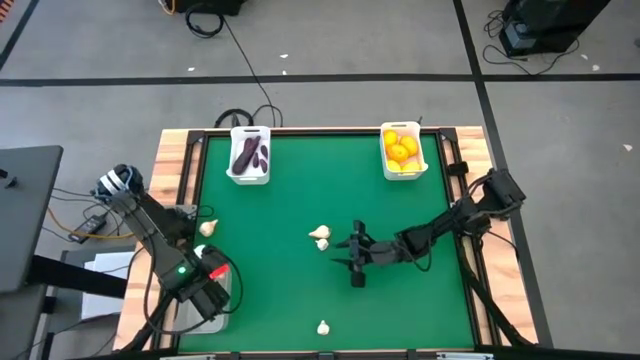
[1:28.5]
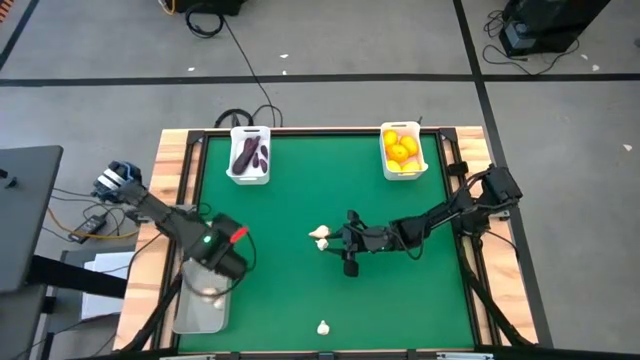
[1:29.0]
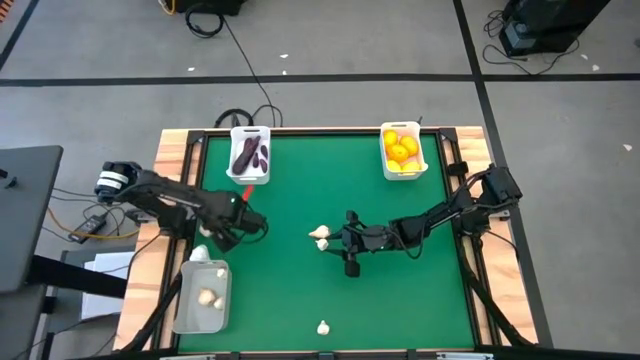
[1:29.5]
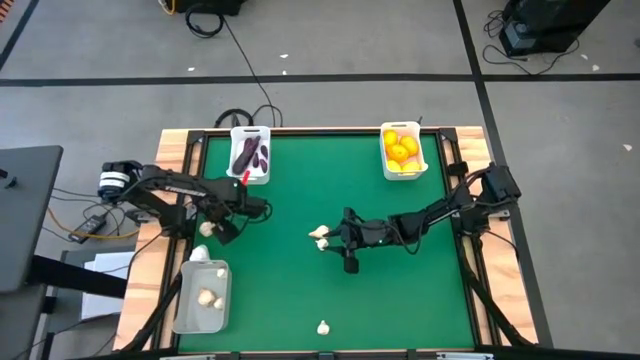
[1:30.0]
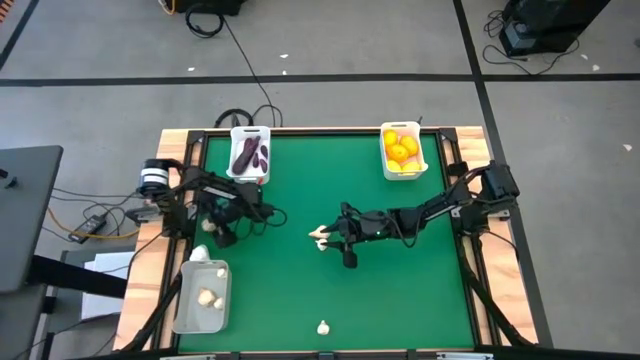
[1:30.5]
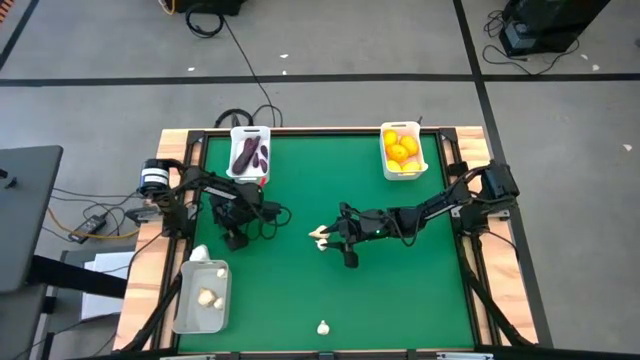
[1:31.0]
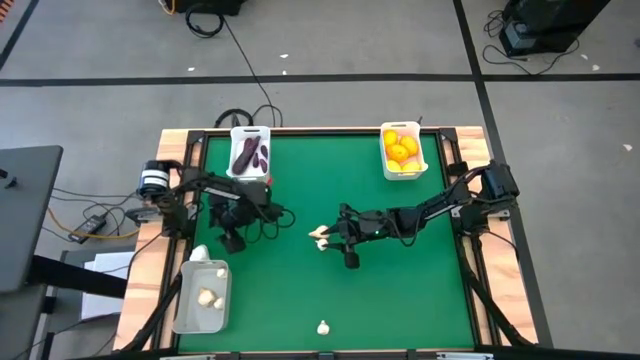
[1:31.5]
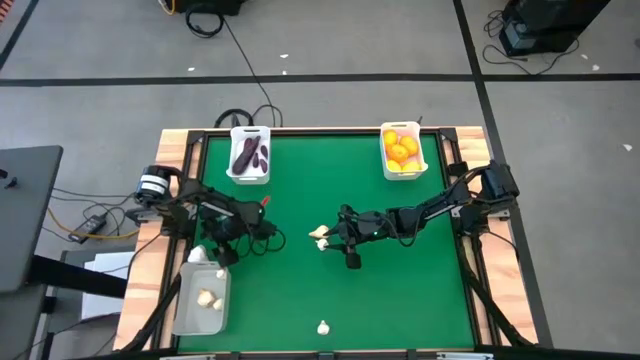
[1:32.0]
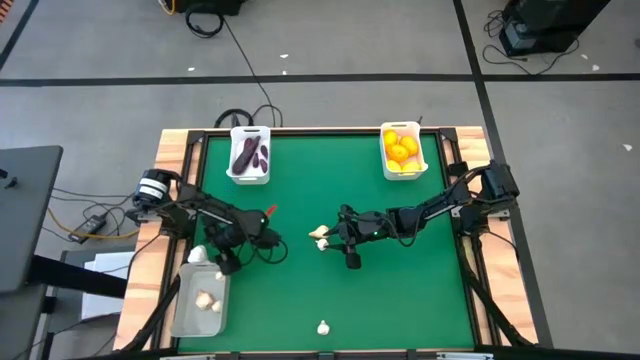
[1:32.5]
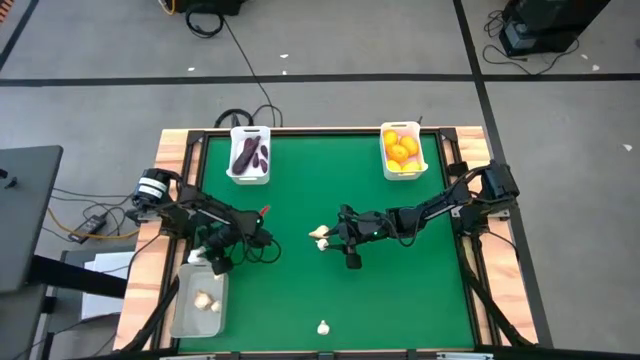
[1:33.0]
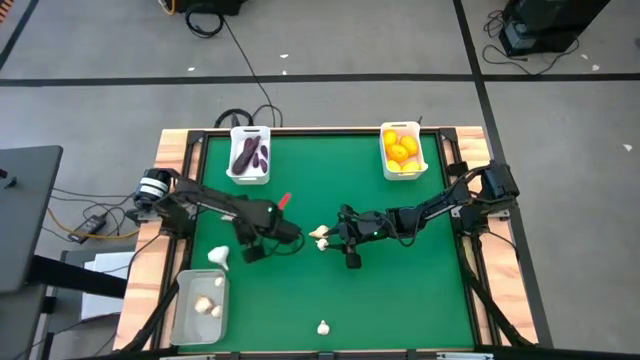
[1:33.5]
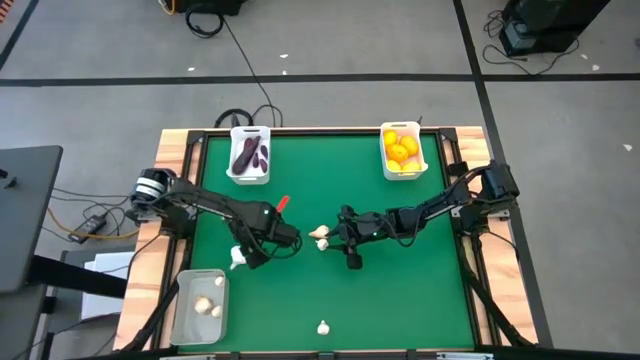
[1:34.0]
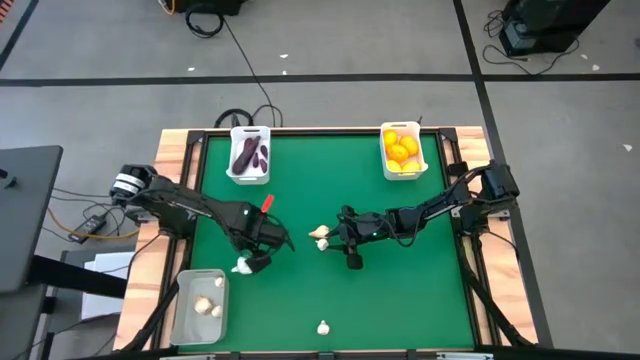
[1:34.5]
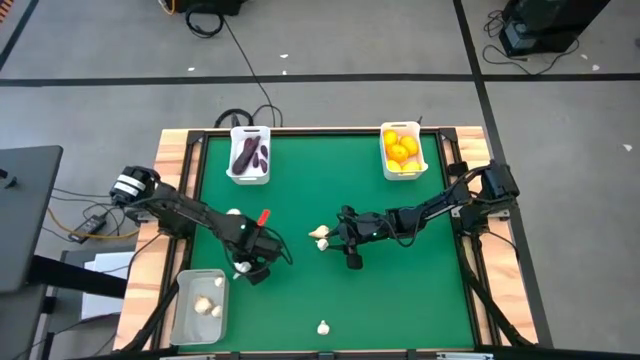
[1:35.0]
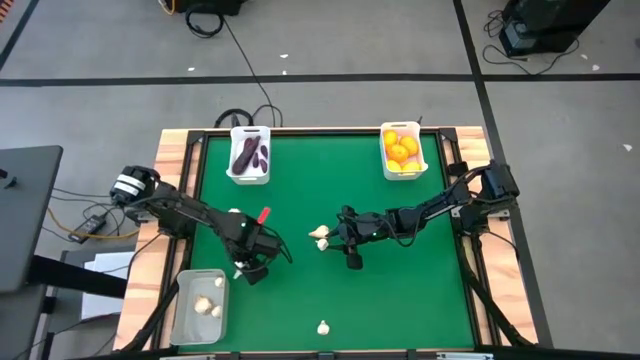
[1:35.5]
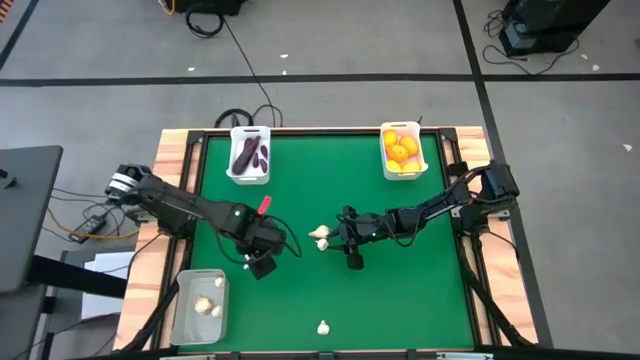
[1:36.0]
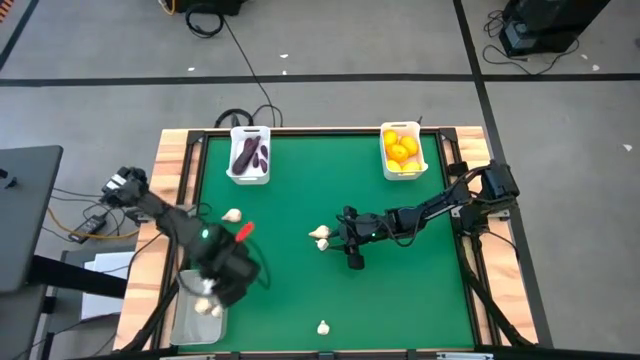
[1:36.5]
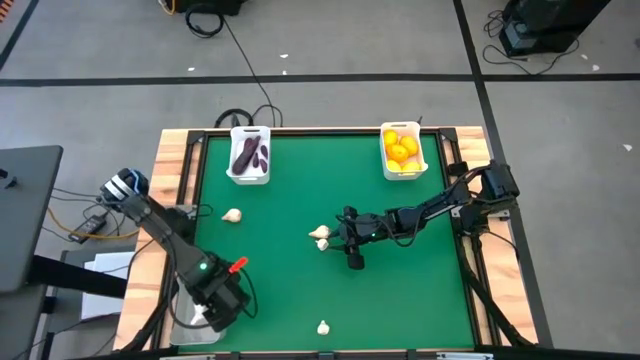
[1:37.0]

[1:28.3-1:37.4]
Task: Sort produce into baskets
Put the top left big garlic into the gray bin

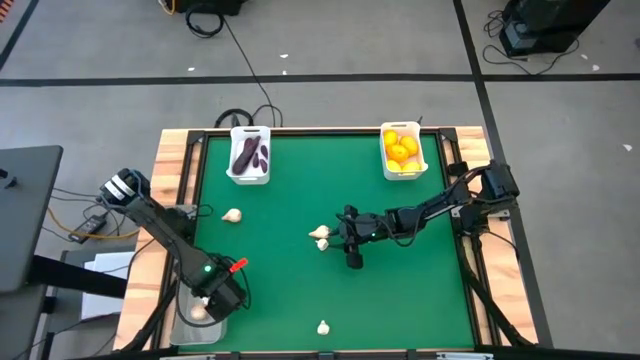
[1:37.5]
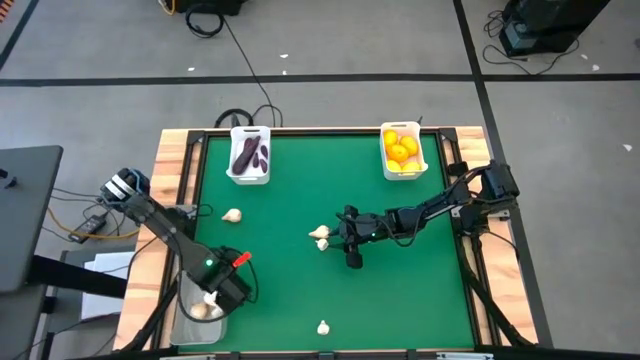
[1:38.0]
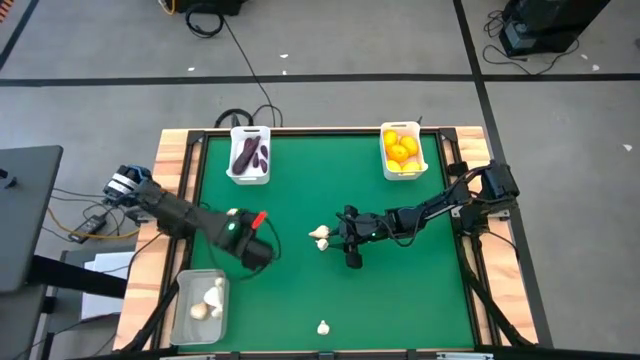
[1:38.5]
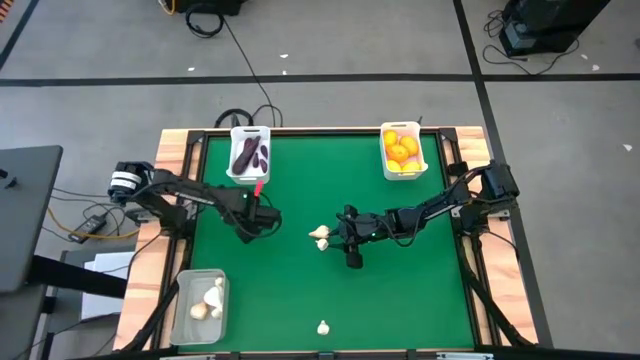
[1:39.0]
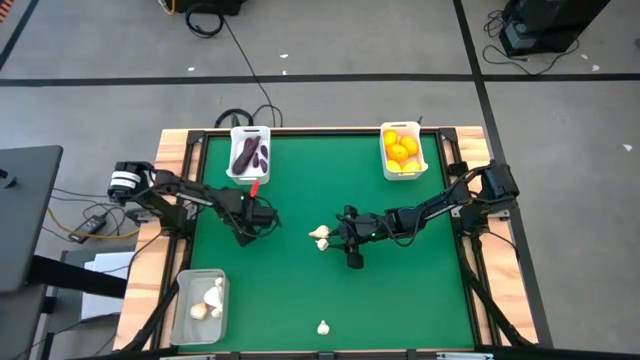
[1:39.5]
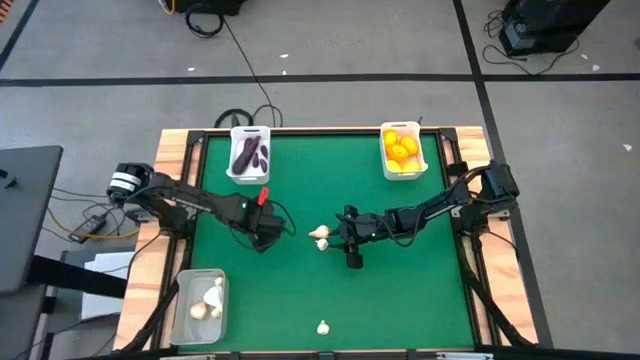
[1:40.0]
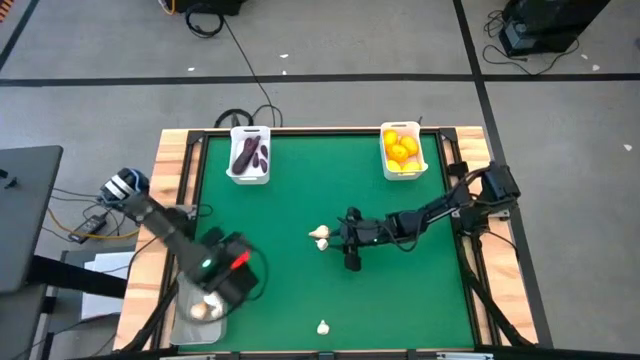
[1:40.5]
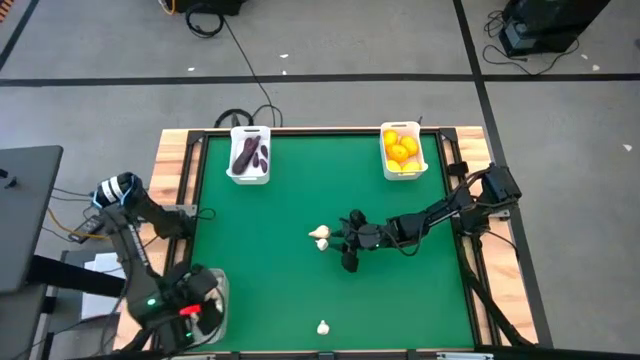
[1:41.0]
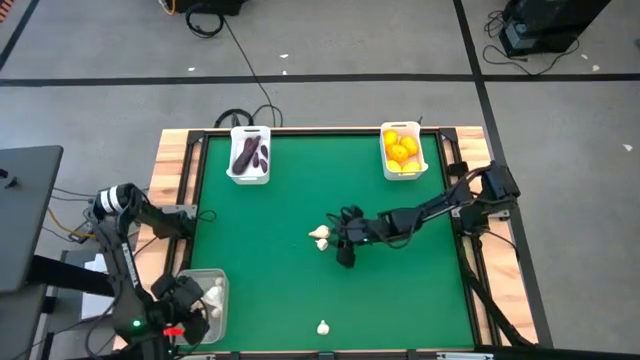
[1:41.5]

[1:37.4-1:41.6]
Put the top left medium garlic into the gray bin

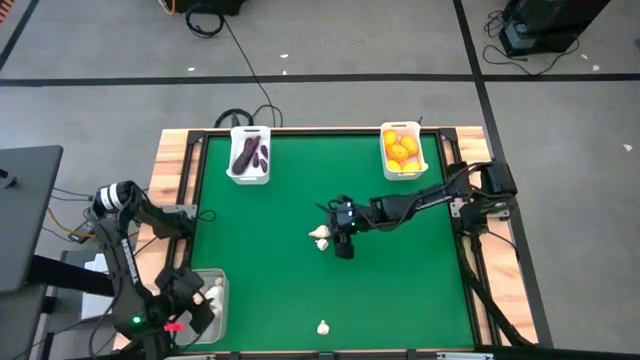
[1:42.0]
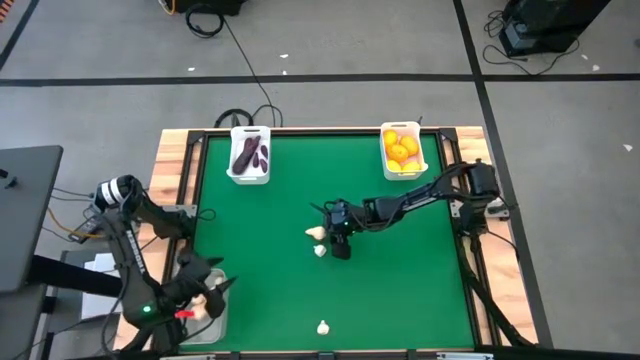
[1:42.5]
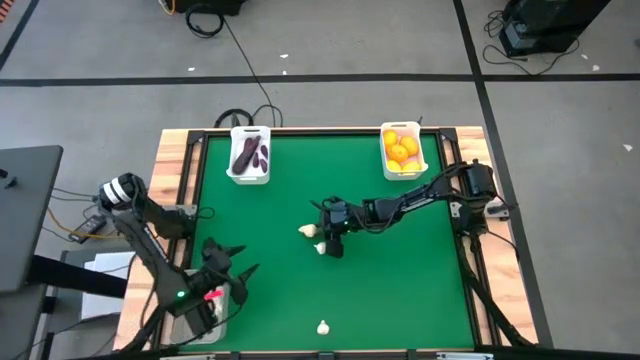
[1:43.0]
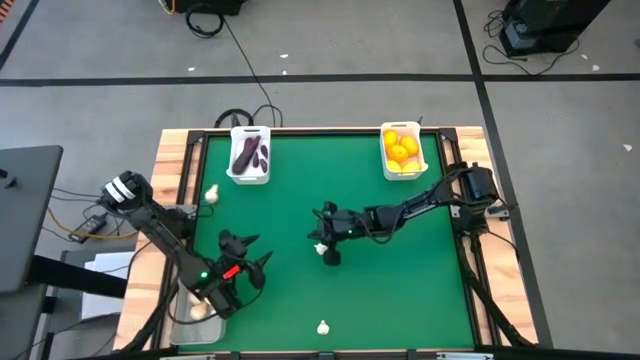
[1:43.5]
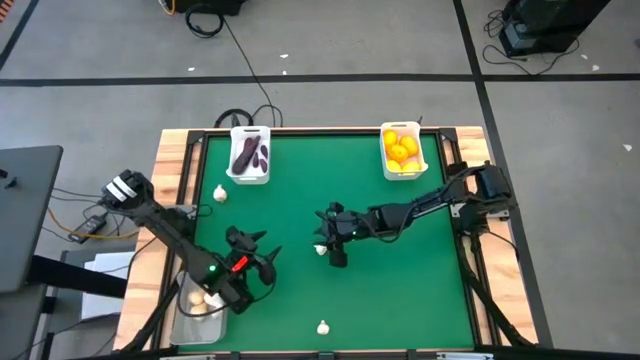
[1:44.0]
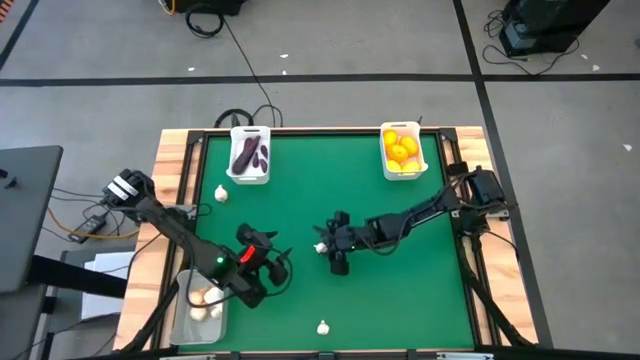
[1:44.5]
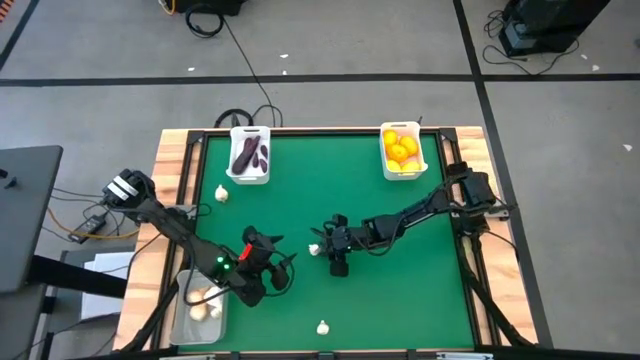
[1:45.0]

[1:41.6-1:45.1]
Put the top medium garlic into the gray bin

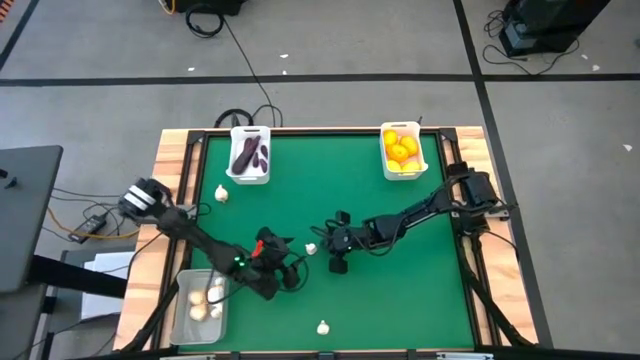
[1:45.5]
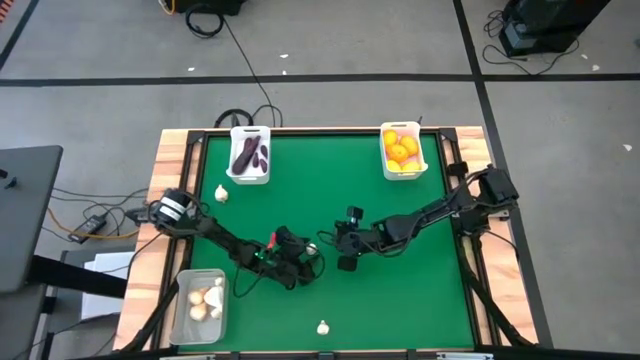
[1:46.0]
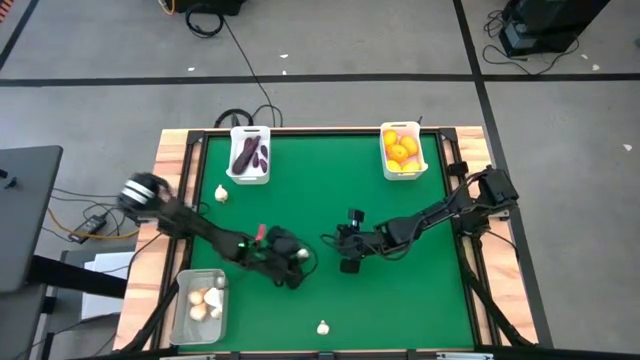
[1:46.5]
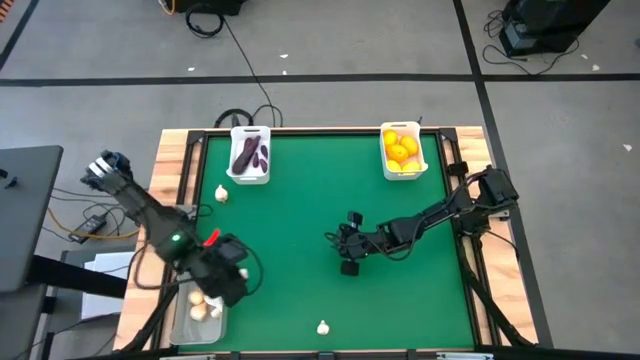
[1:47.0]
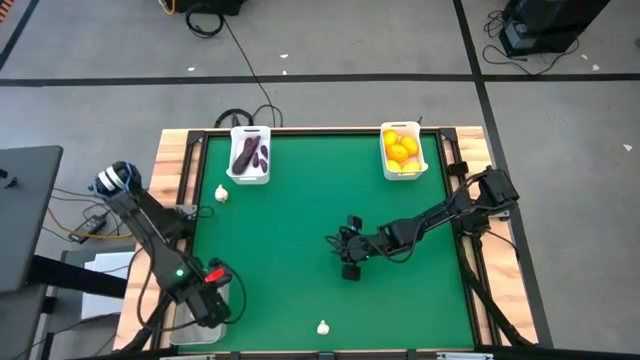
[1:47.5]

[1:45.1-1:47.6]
Put the top small garlic into the gray bin

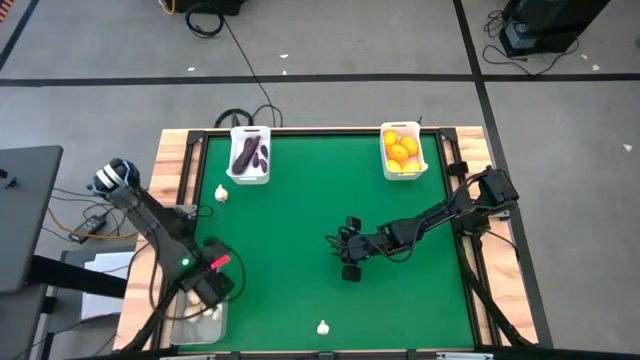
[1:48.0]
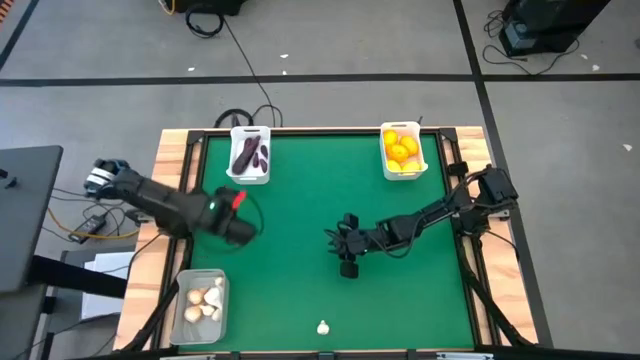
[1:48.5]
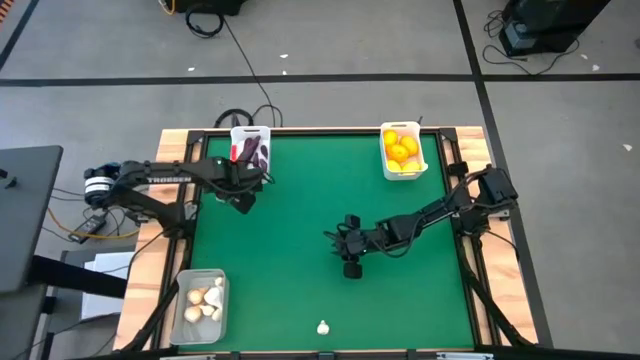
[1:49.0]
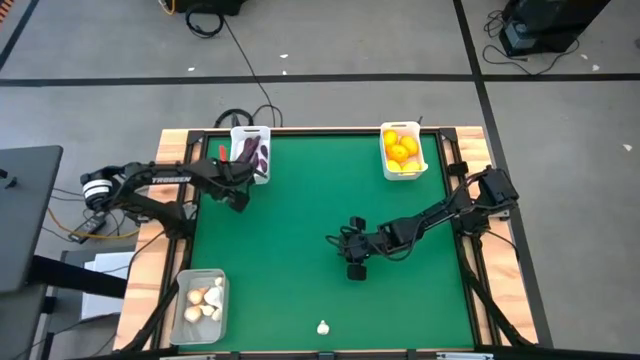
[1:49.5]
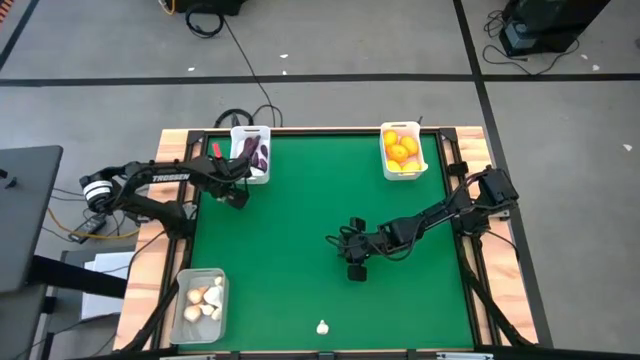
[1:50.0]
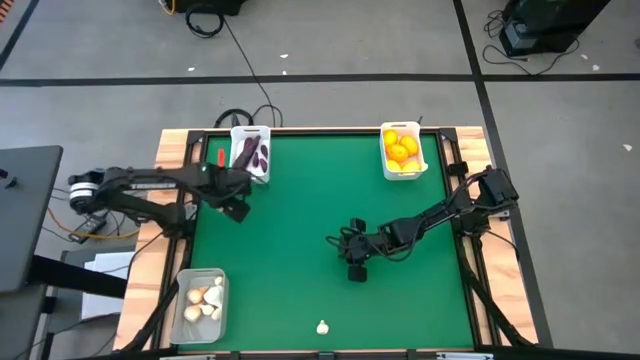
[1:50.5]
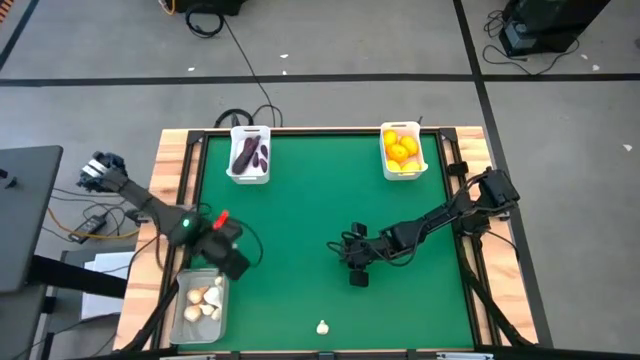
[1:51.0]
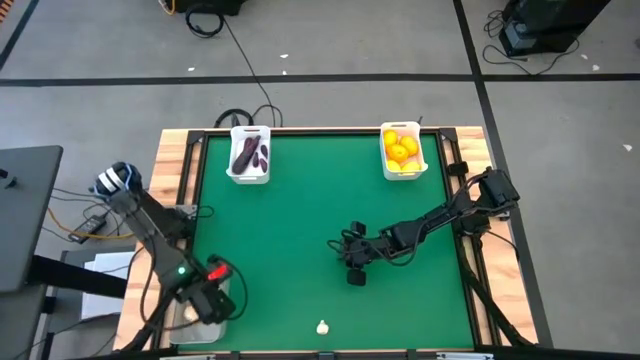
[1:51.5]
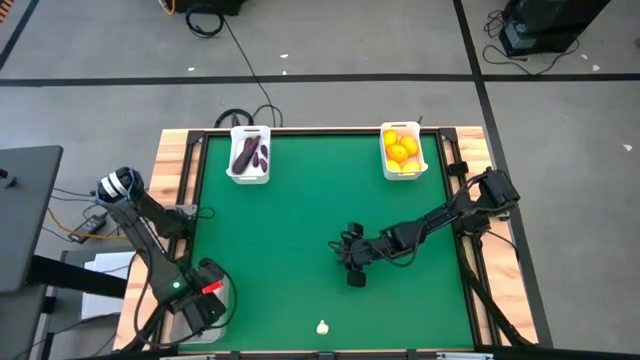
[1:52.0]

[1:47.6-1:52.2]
Put the top big garlic into the gray bin
